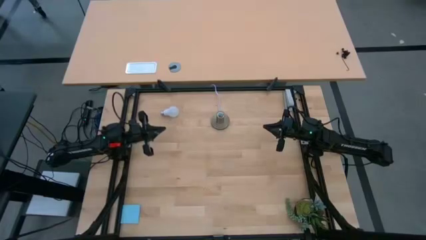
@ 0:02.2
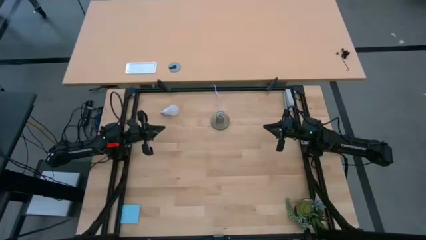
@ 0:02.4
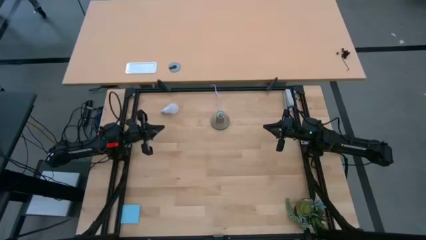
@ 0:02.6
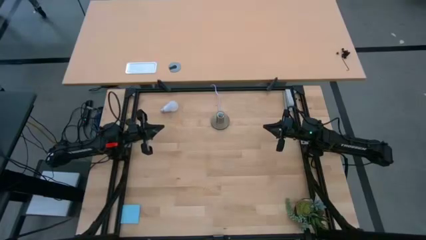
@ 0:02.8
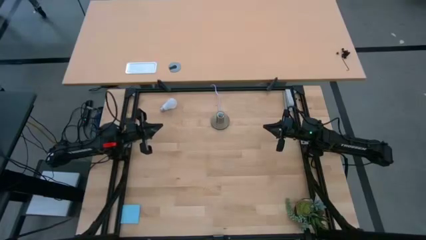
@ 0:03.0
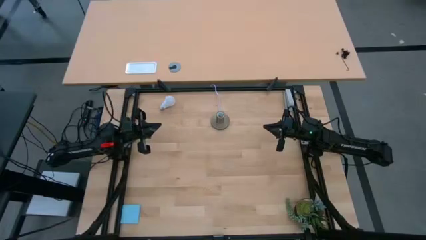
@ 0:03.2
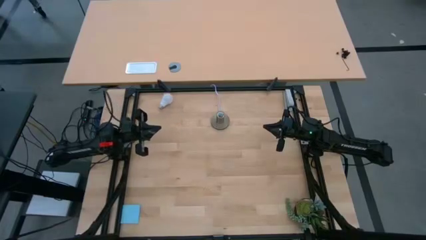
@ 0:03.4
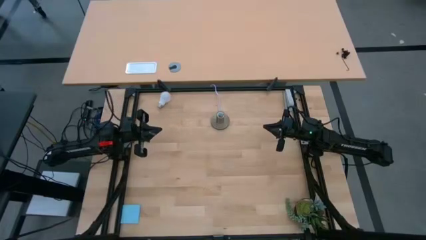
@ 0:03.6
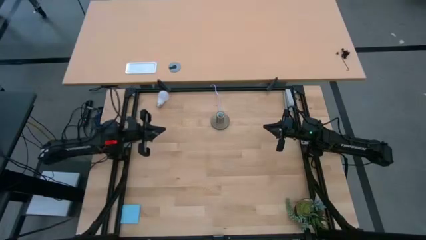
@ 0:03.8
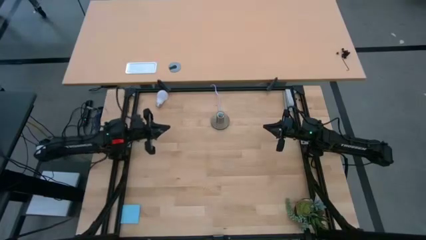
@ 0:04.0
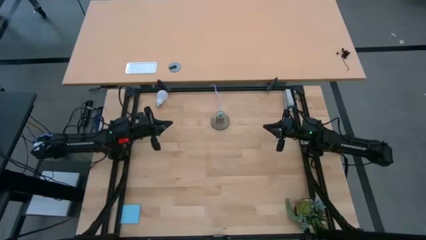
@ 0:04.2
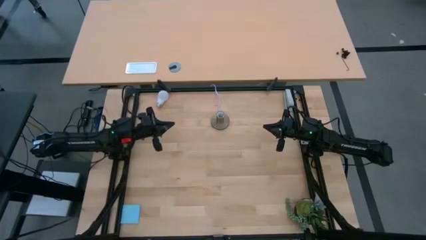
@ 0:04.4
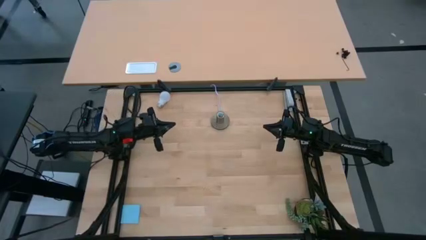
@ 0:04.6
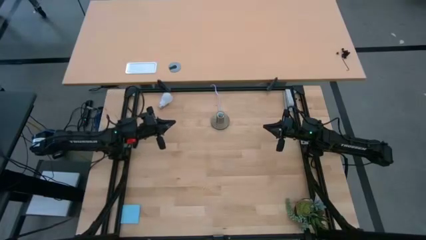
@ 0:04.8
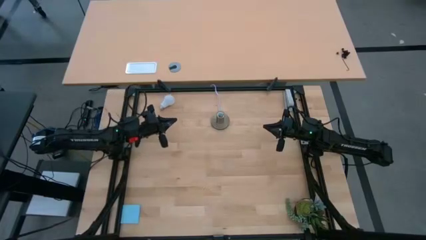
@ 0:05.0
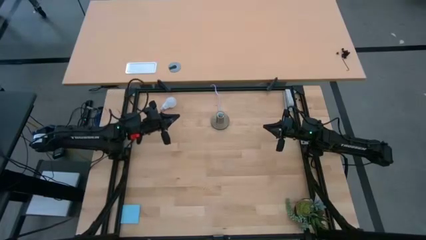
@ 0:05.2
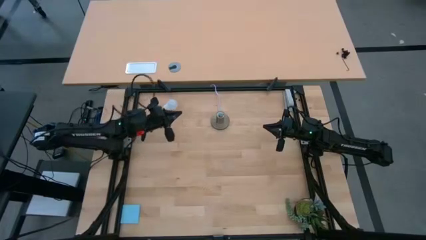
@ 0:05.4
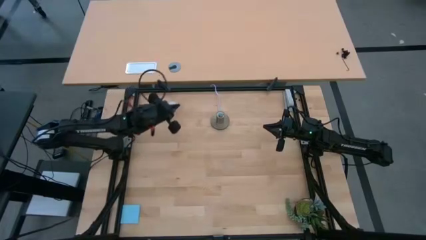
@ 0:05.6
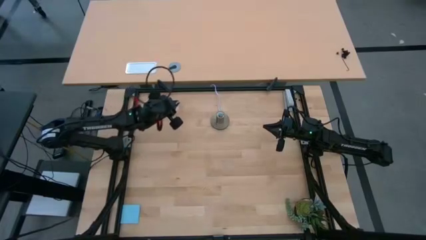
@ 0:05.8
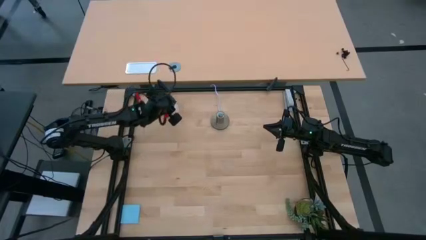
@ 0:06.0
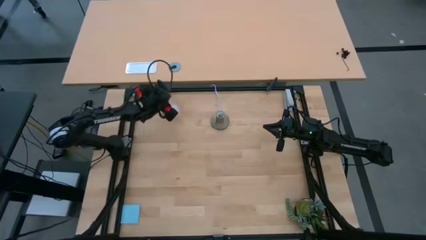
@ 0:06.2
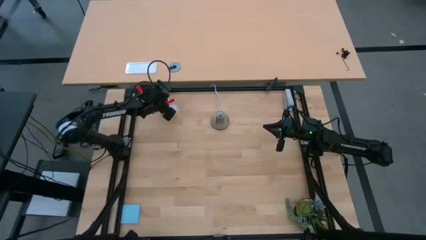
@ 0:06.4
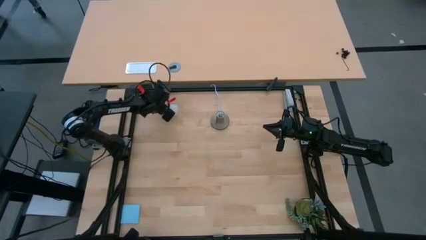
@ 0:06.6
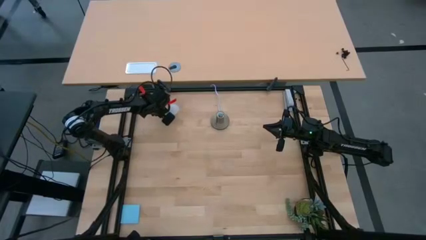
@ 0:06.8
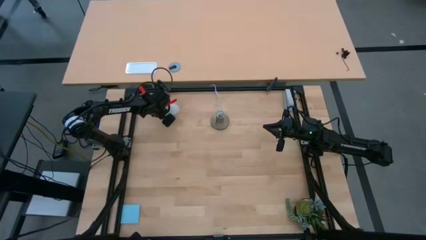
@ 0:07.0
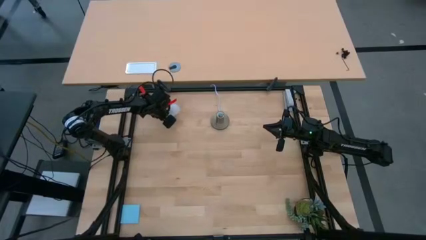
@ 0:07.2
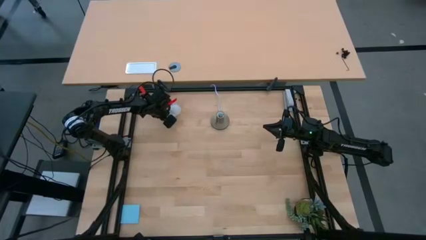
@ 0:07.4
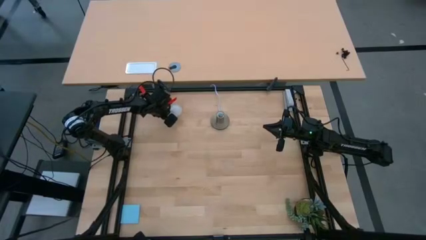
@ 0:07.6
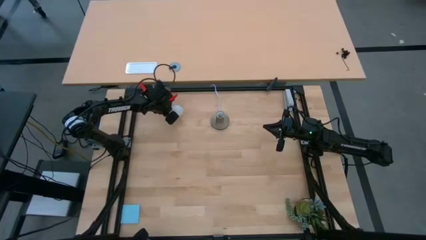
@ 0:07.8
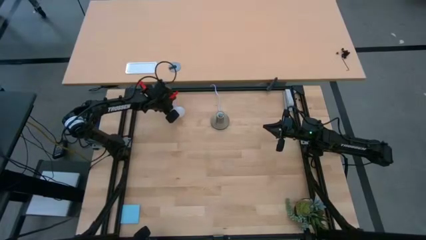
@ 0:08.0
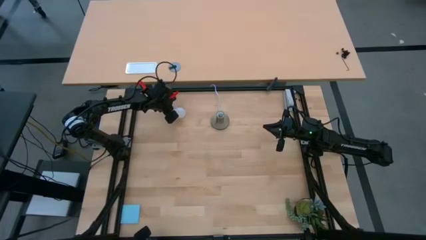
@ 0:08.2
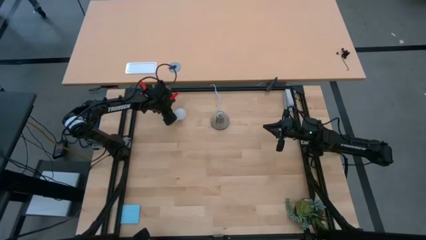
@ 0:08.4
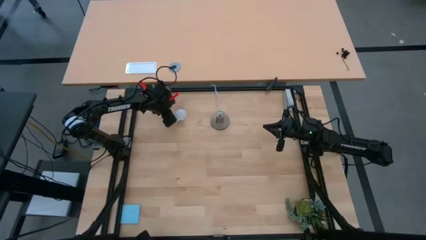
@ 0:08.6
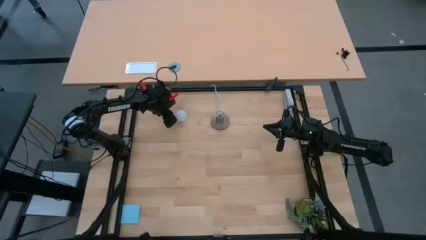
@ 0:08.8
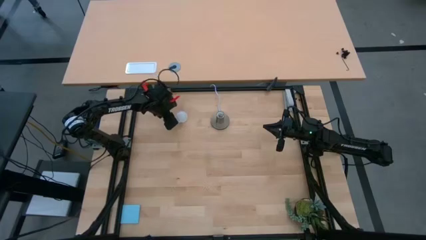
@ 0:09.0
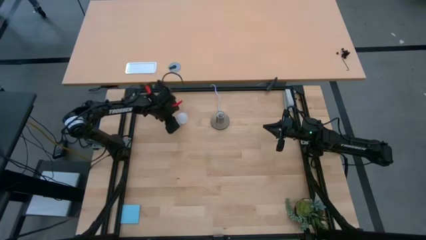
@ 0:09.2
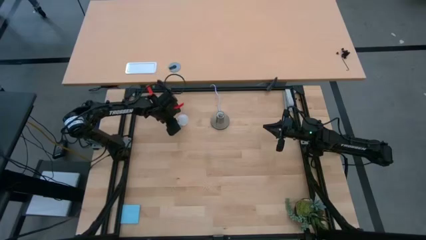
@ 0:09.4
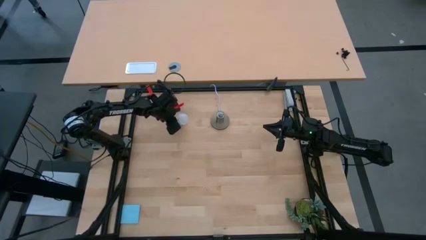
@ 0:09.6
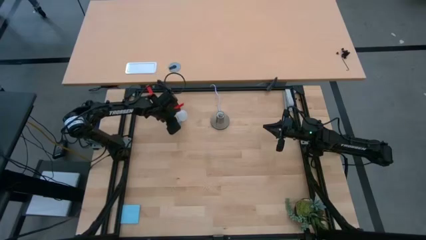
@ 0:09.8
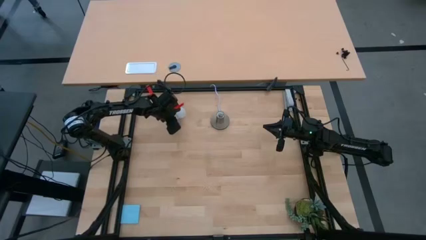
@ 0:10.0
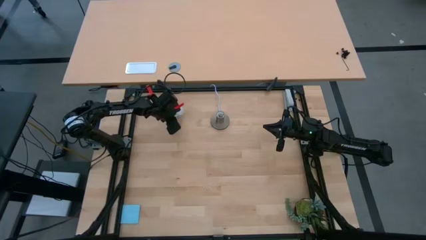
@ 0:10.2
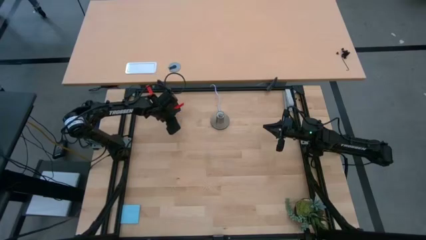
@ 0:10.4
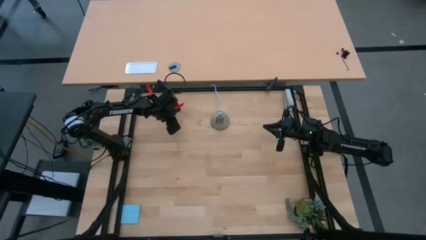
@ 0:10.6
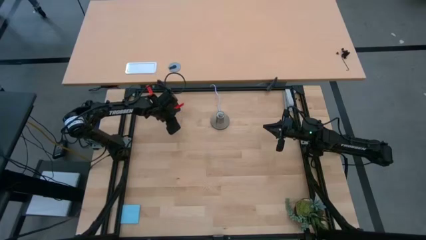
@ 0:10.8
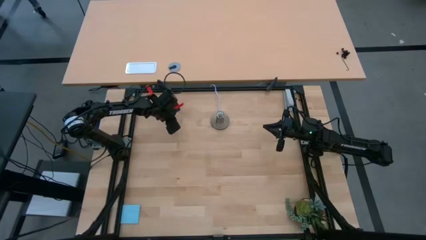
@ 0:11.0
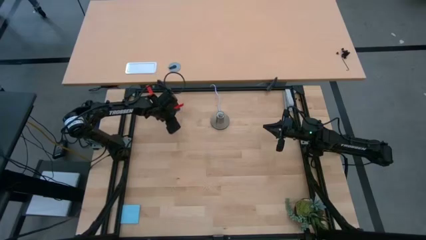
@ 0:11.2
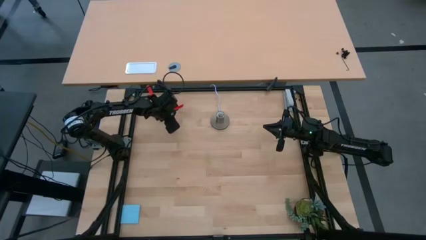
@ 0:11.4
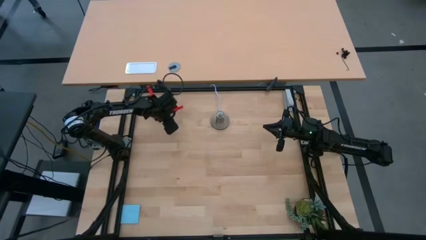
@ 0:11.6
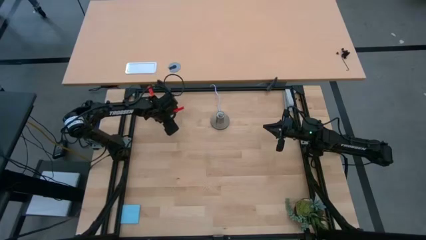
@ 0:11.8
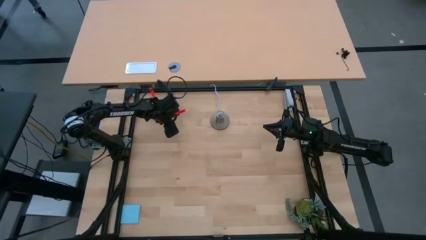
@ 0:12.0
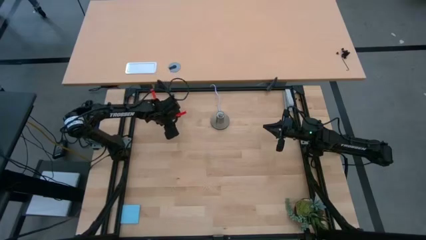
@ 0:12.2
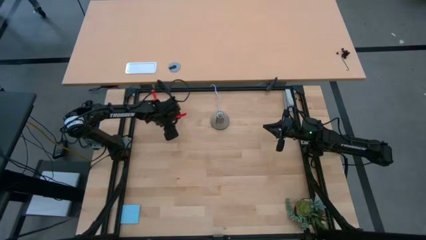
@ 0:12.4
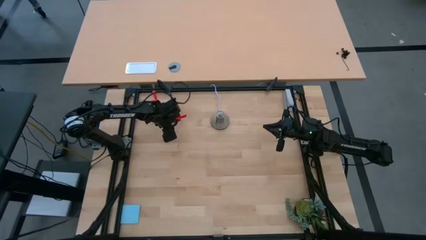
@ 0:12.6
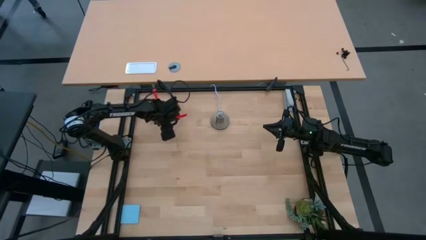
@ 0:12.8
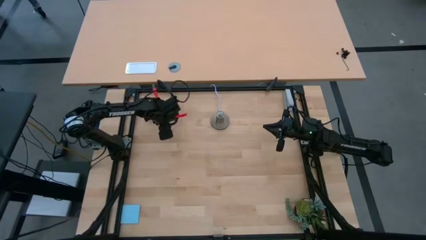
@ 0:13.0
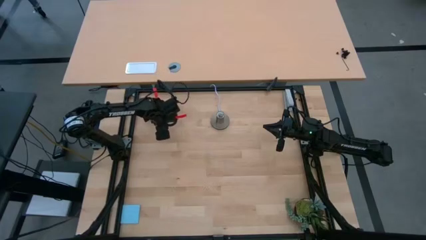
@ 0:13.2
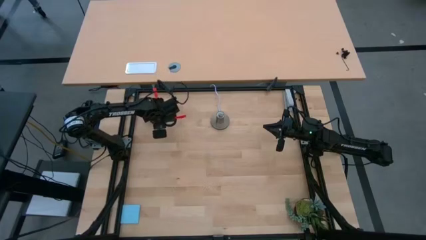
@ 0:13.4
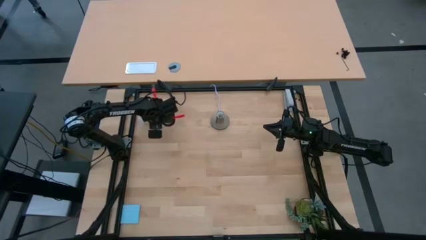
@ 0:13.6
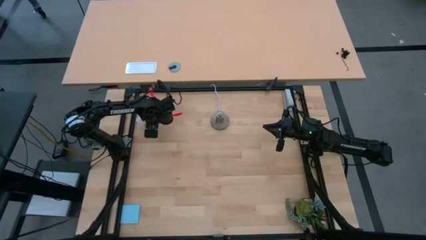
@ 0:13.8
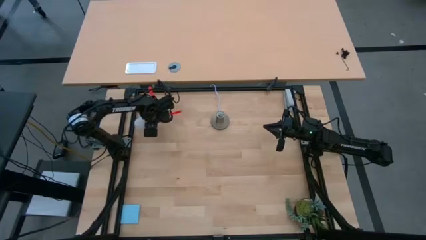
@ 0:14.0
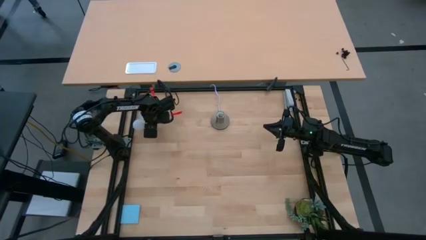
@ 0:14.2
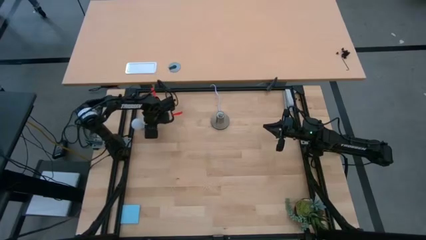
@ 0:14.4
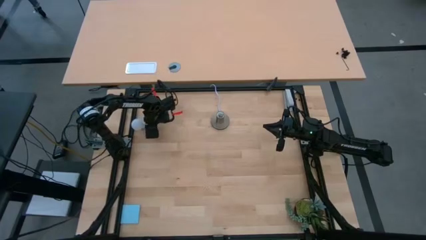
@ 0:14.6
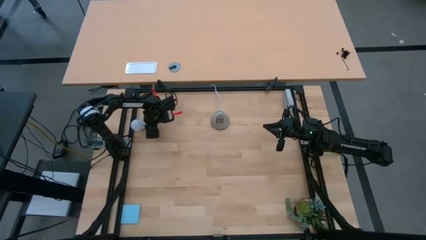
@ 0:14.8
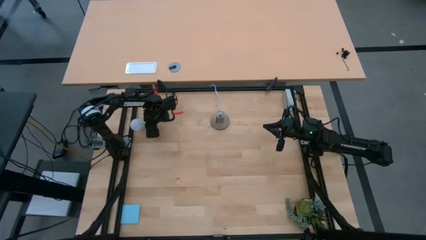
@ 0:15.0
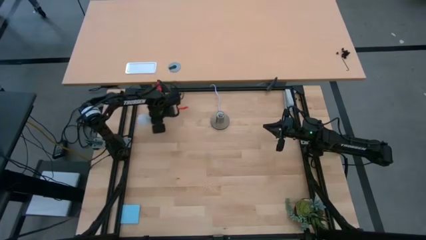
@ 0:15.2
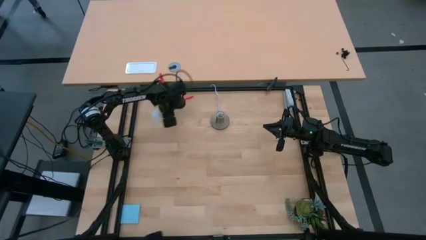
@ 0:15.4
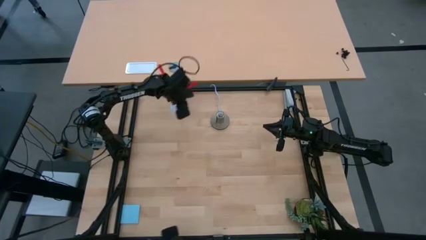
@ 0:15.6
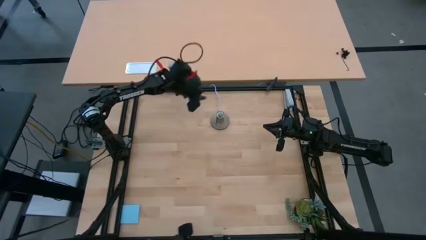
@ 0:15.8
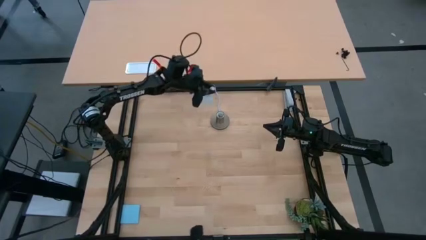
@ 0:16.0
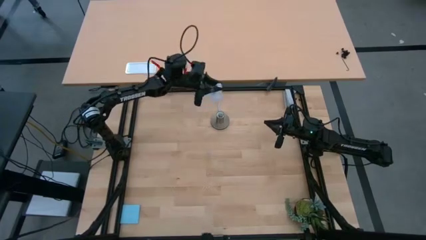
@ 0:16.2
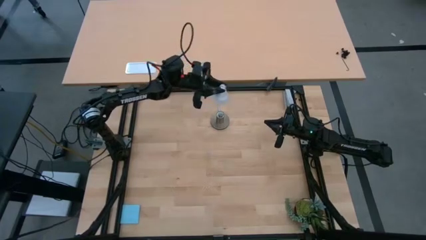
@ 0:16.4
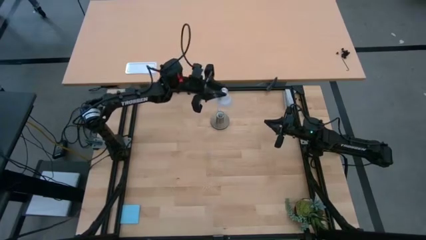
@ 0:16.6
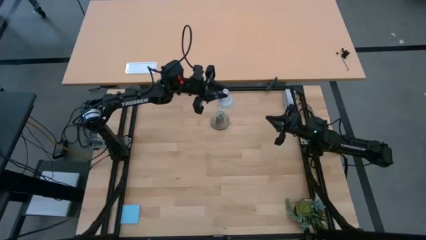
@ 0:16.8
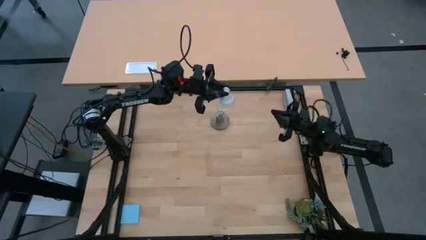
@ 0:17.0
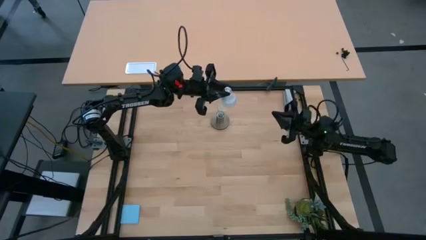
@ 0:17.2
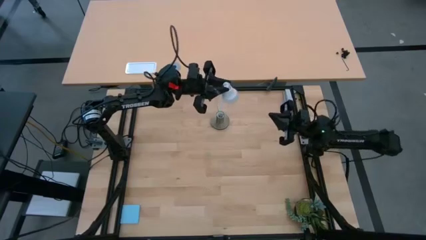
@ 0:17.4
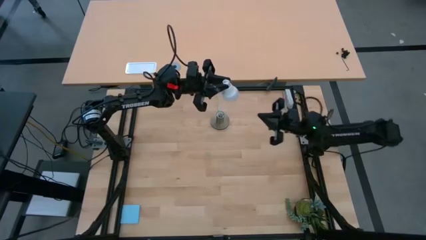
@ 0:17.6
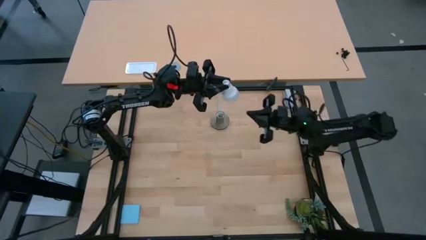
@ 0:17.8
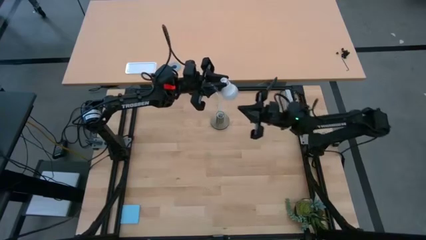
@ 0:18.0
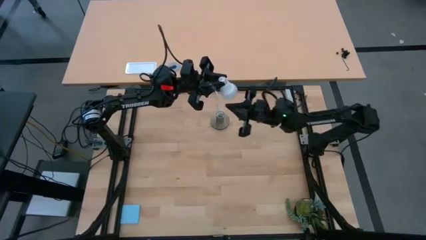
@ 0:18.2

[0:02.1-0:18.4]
Task: Screw lightbulb
Insert the light bulb into the table lamp holder
